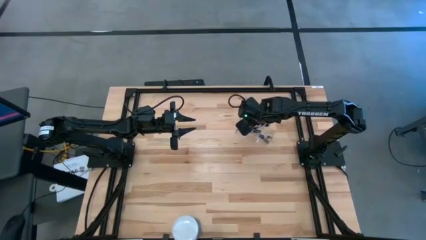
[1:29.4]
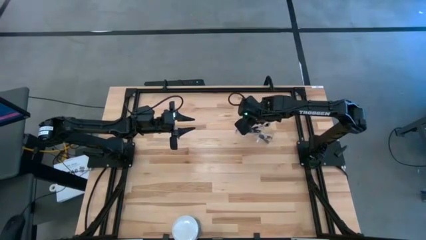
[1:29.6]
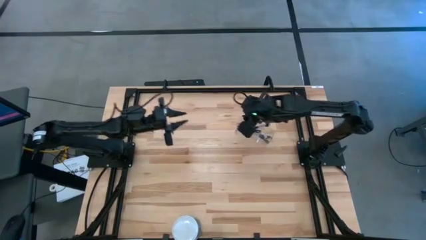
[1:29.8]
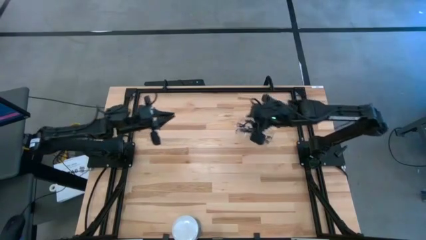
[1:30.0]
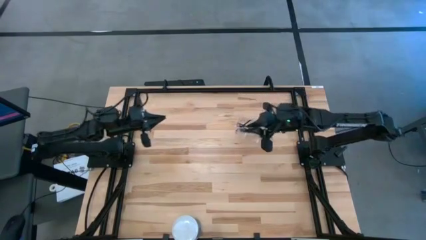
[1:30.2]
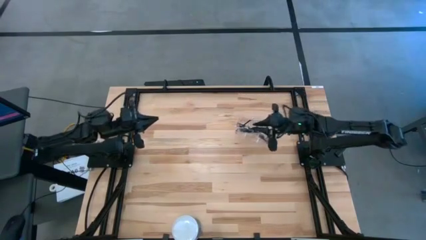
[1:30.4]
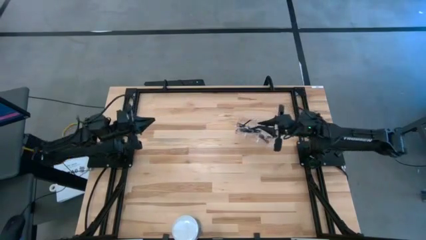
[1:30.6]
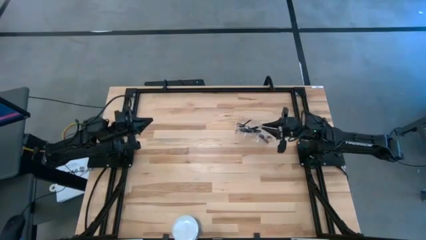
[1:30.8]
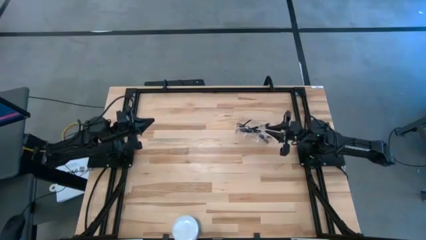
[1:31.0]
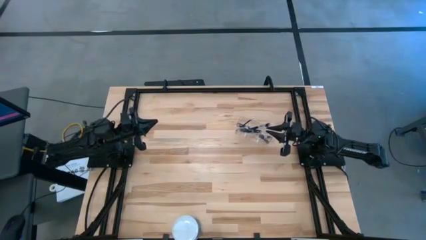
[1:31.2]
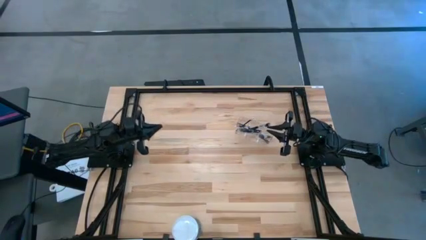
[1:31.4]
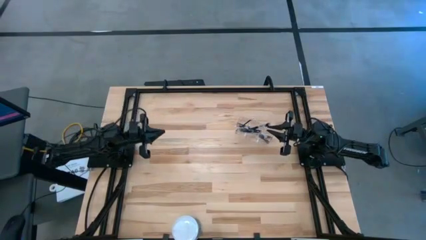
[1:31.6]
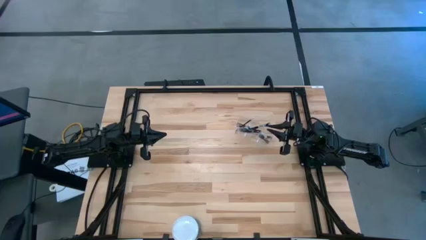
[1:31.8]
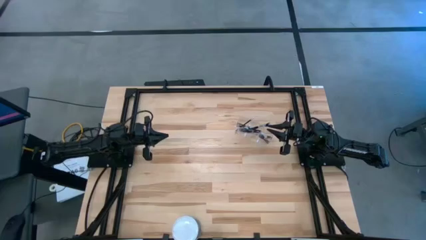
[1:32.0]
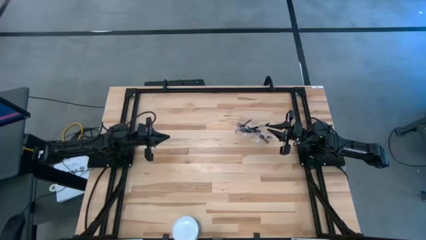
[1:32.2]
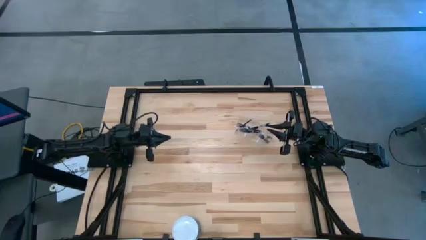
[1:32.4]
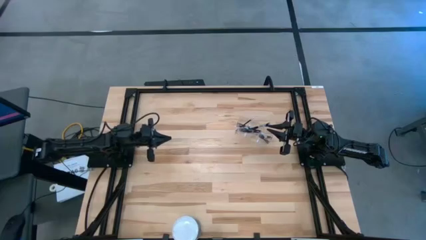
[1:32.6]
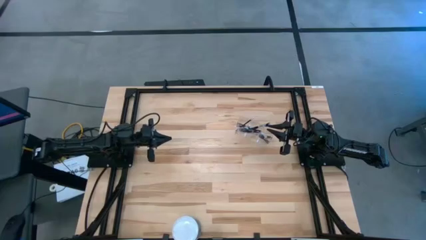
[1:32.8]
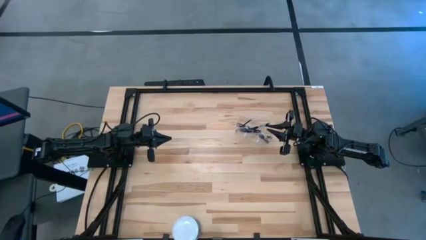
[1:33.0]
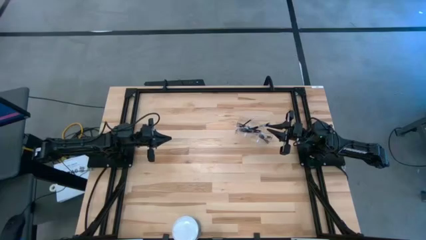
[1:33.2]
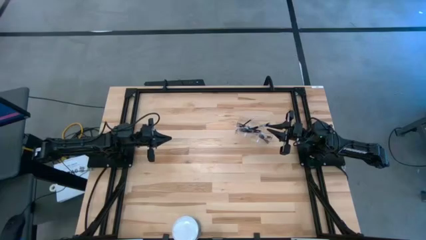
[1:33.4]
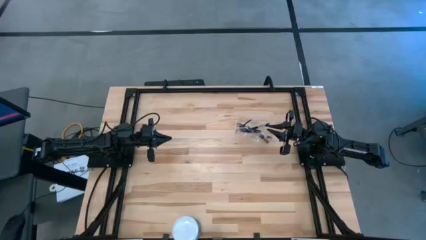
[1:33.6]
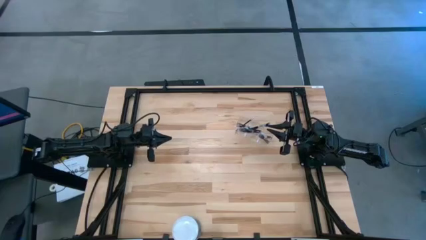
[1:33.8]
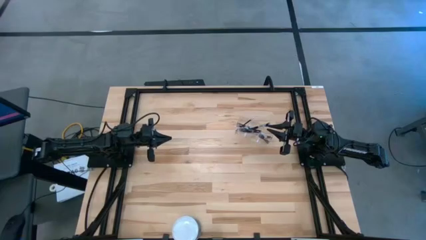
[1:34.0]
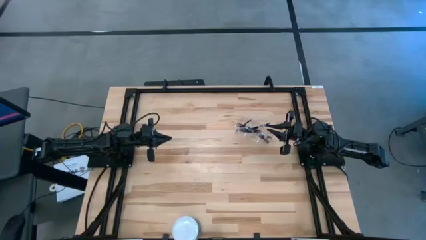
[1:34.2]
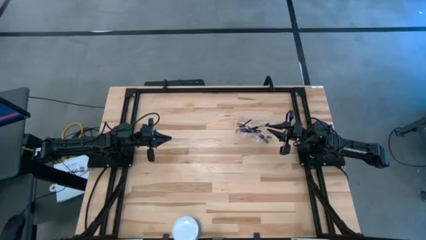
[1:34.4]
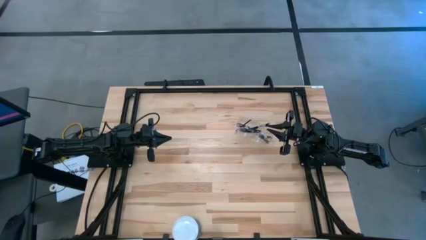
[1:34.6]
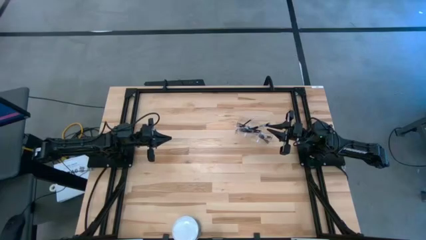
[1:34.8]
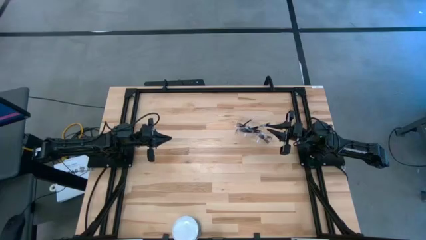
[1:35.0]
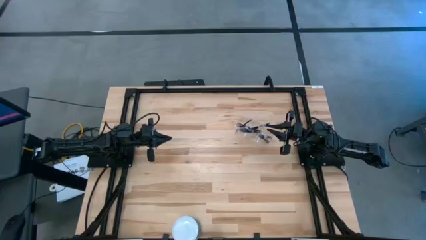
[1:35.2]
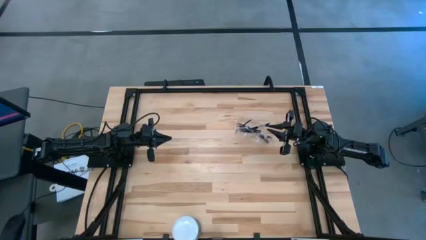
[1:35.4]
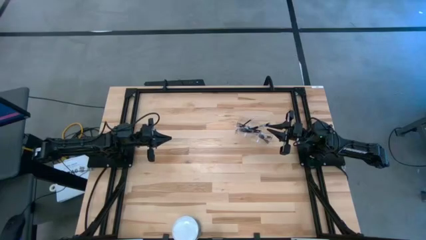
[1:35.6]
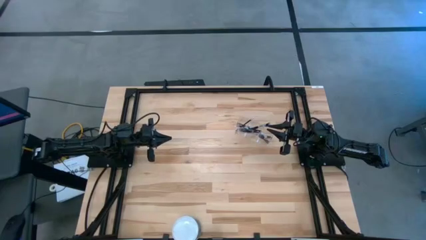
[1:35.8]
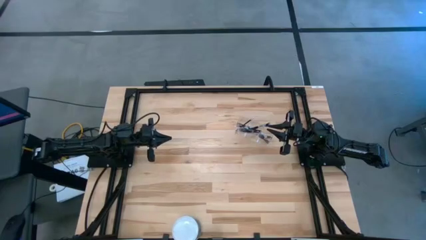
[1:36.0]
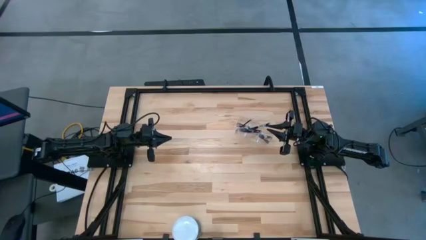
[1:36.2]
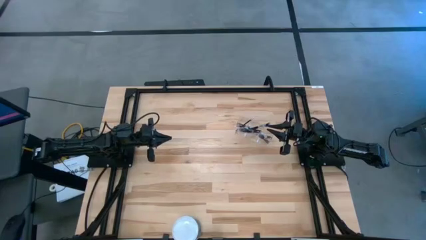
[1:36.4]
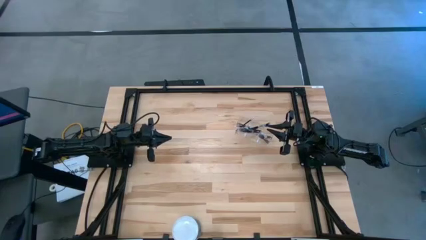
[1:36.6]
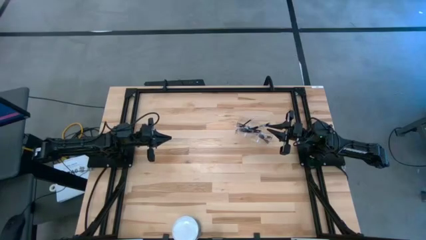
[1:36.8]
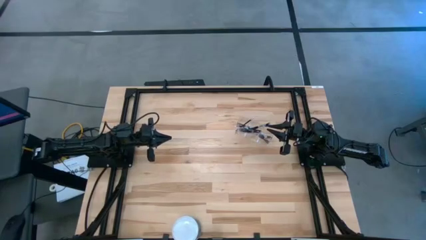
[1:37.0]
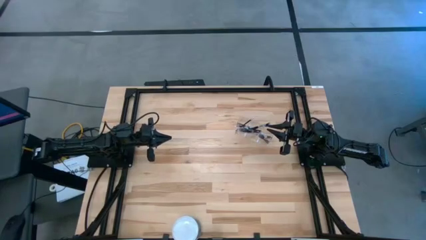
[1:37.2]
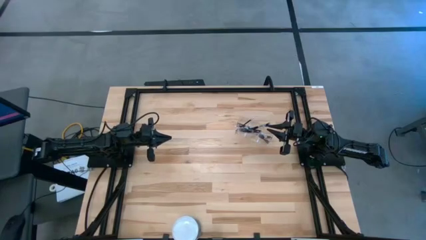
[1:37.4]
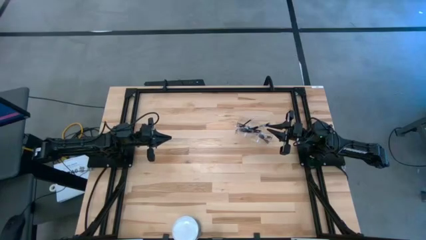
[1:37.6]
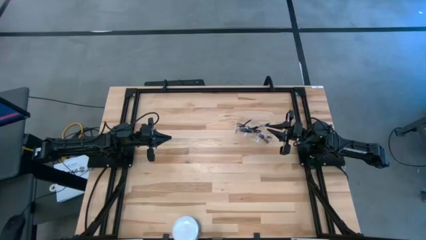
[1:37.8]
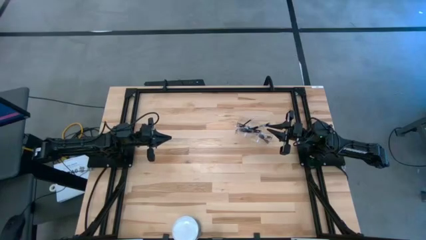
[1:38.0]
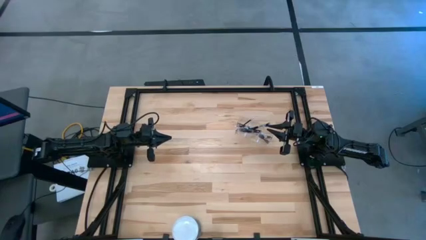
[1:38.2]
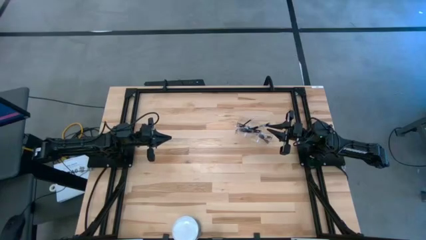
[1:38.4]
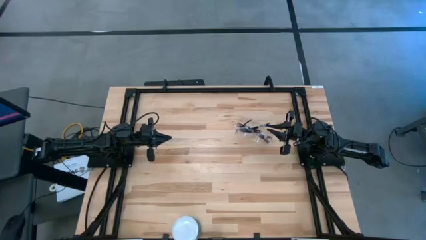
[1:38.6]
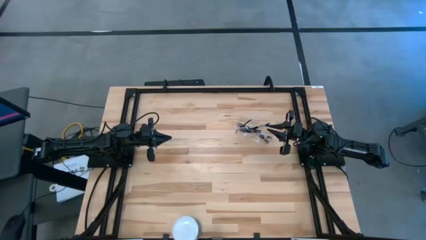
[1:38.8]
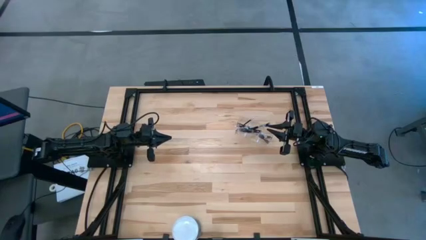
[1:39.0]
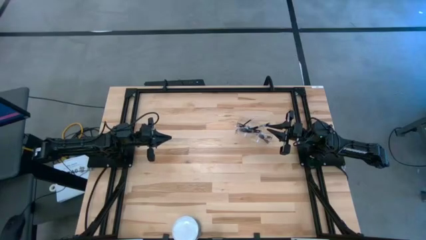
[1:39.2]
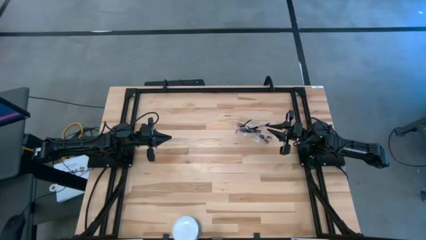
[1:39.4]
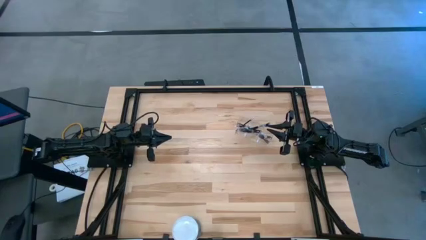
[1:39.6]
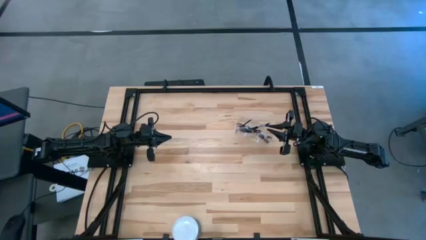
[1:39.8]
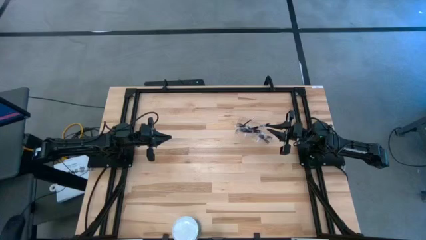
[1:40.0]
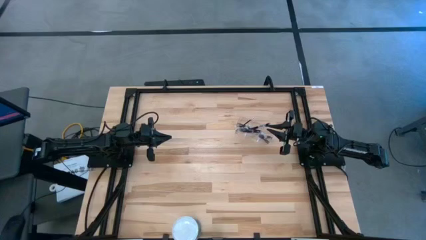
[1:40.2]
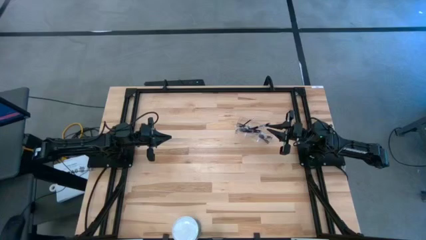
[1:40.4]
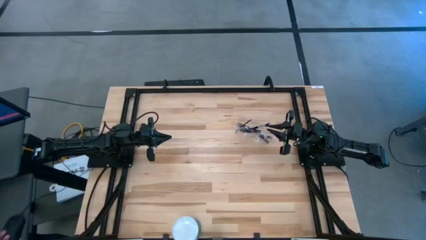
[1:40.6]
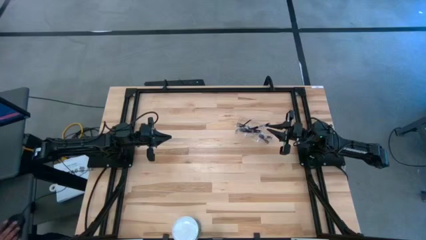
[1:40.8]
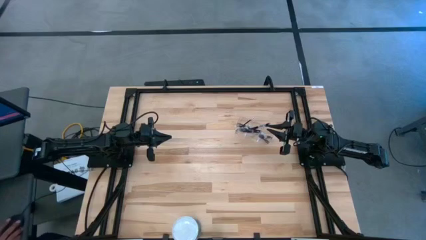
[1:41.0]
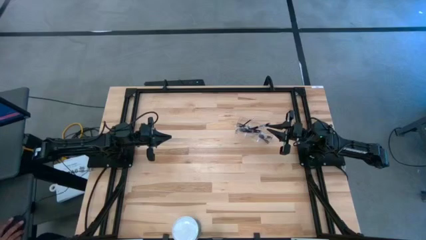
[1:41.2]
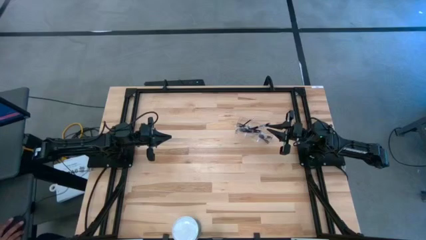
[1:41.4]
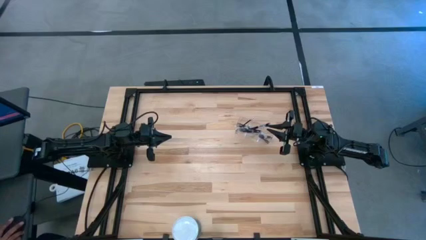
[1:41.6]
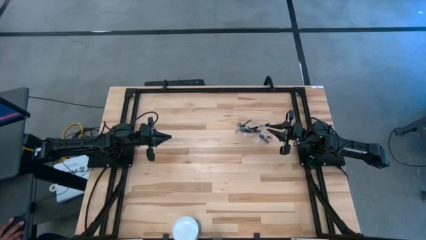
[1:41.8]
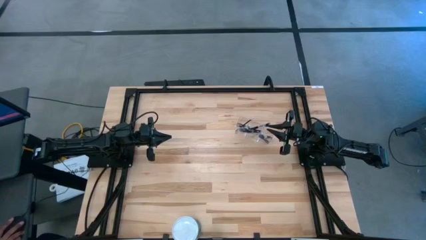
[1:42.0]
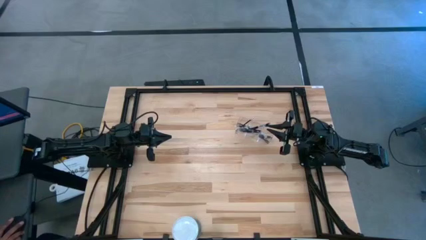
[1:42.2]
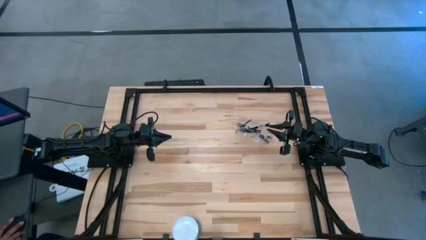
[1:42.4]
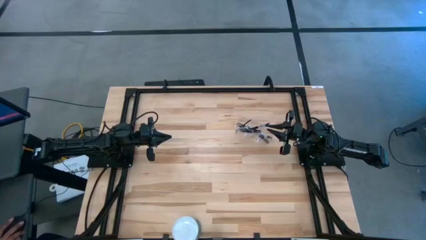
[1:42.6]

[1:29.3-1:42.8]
Task: Pick & Place Makeup Brushes
Return to Home Position

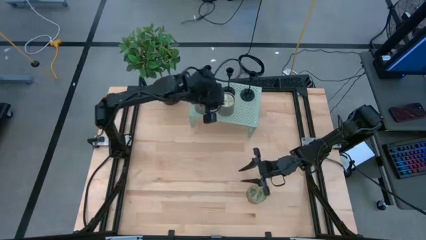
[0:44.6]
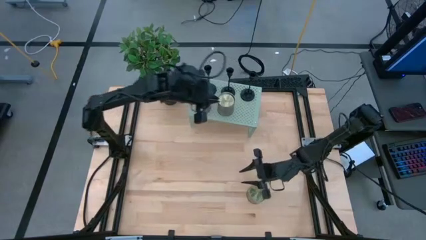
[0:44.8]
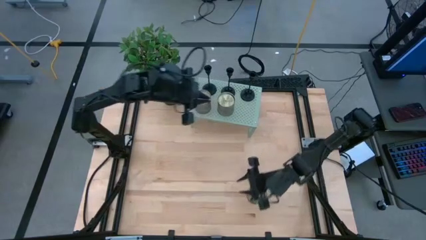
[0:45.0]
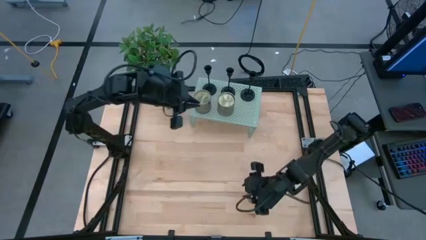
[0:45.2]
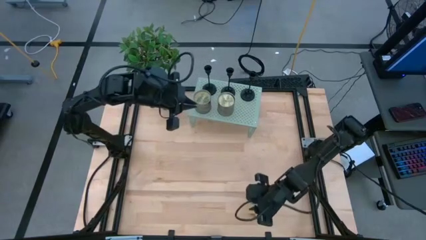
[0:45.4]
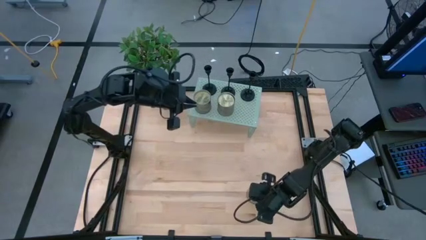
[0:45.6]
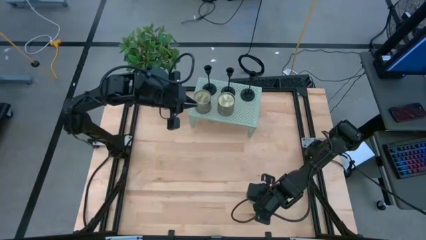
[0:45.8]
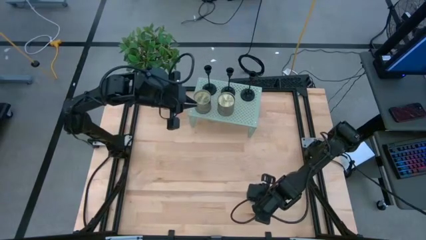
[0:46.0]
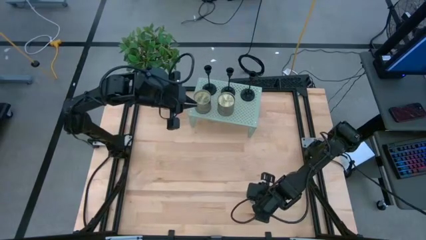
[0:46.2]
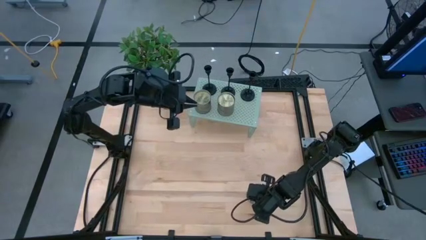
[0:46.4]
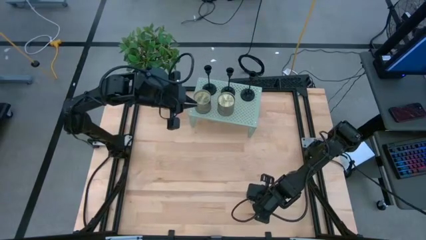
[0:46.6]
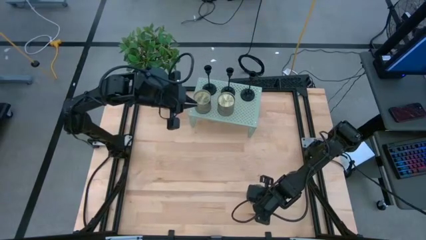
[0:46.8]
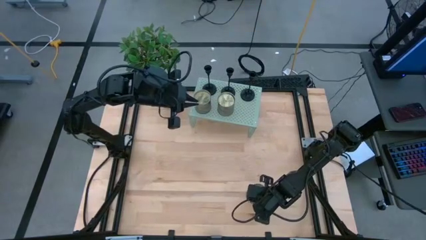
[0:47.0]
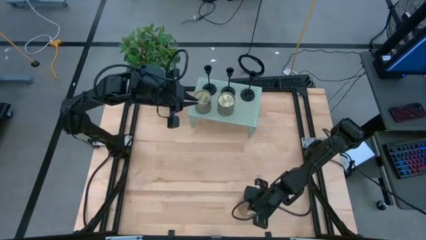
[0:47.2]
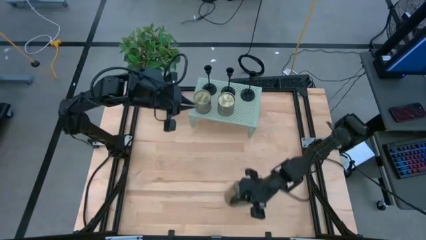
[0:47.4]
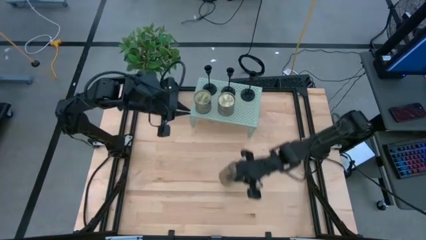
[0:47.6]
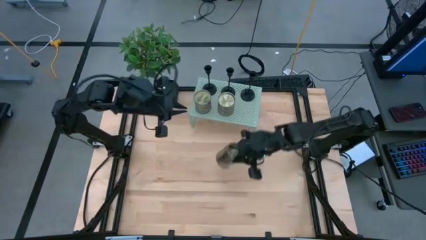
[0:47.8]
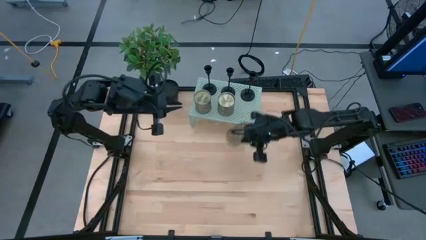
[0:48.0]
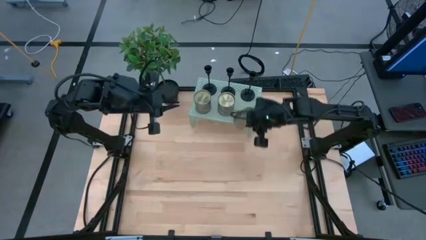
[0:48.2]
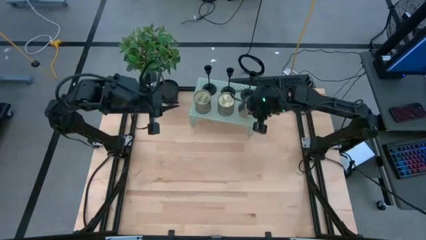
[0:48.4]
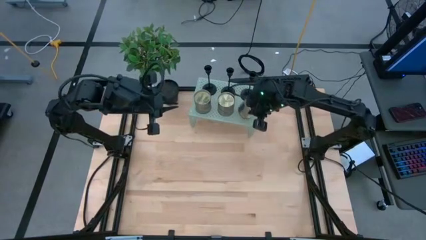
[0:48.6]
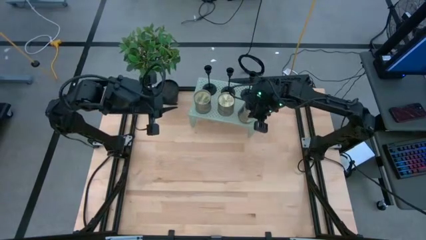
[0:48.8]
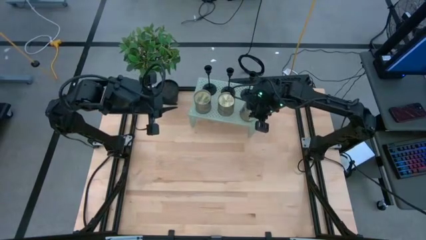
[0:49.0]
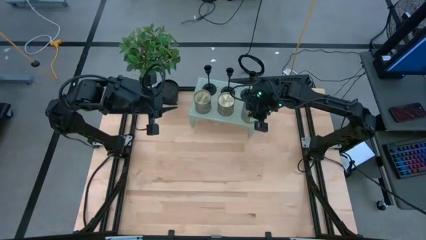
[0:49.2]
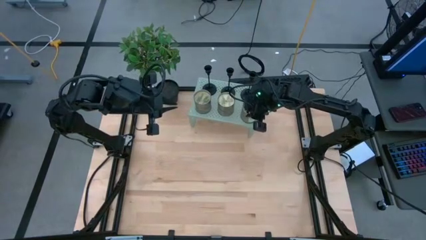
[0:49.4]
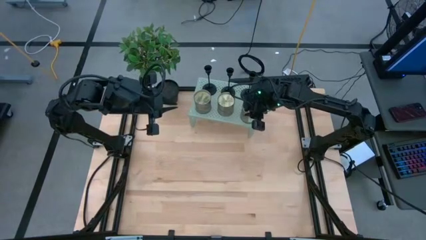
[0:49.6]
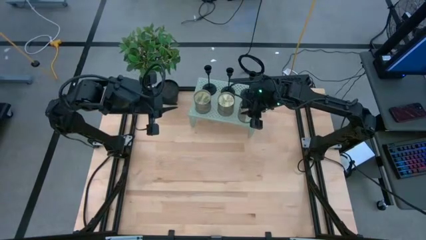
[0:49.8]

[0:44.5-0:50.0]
Task: Pick & Place candle stick holders
Put the scented candle on the shelf
